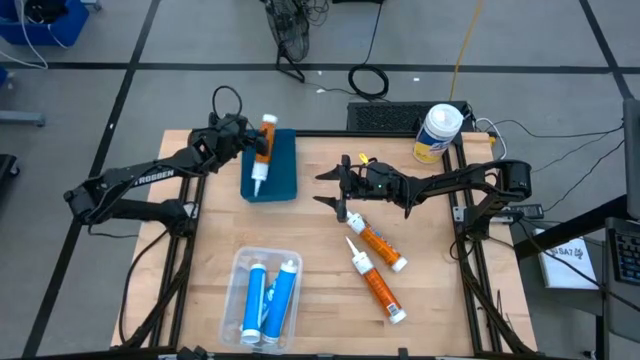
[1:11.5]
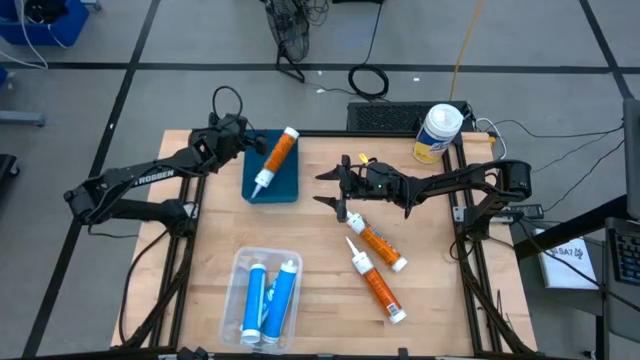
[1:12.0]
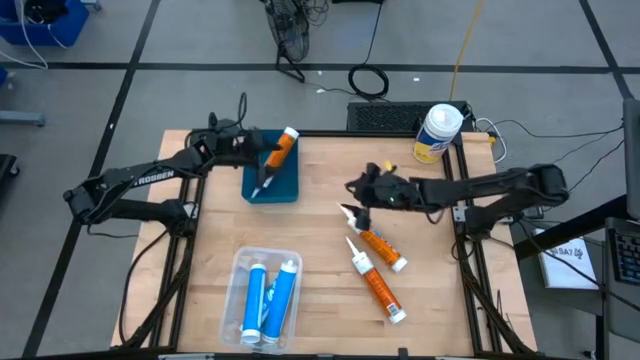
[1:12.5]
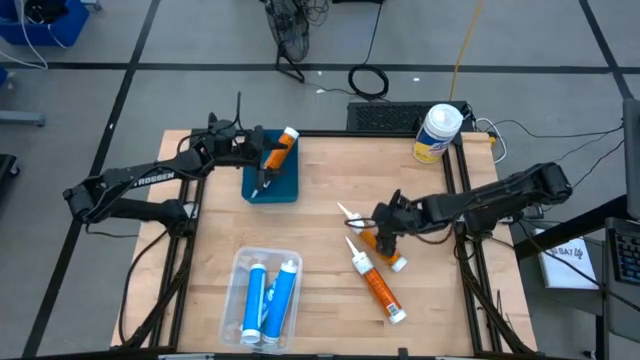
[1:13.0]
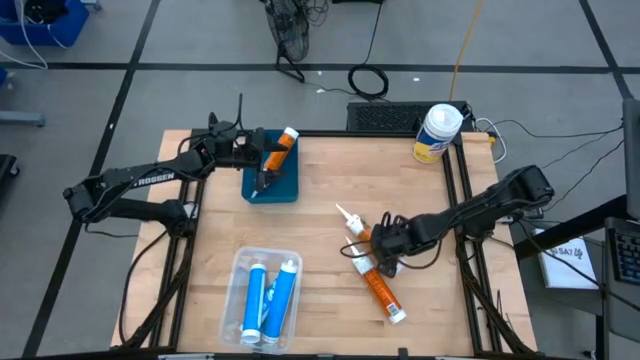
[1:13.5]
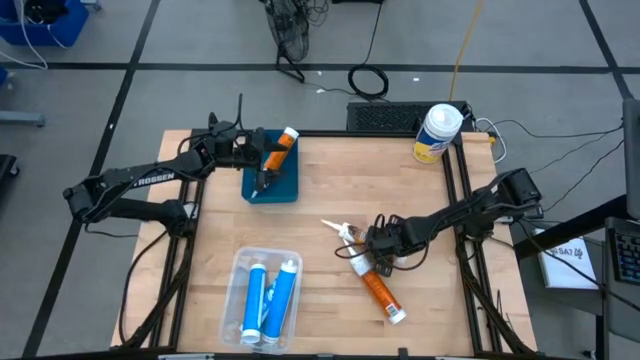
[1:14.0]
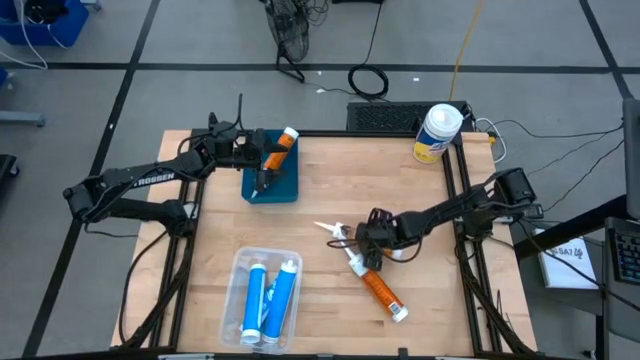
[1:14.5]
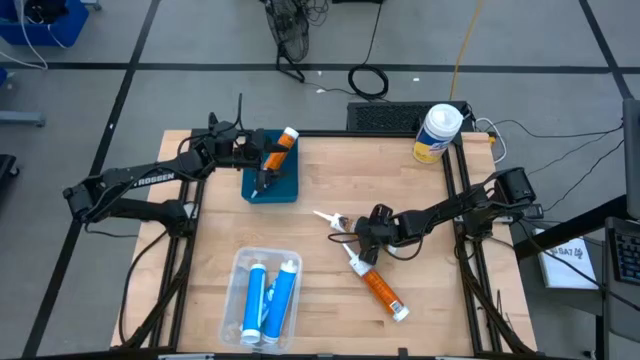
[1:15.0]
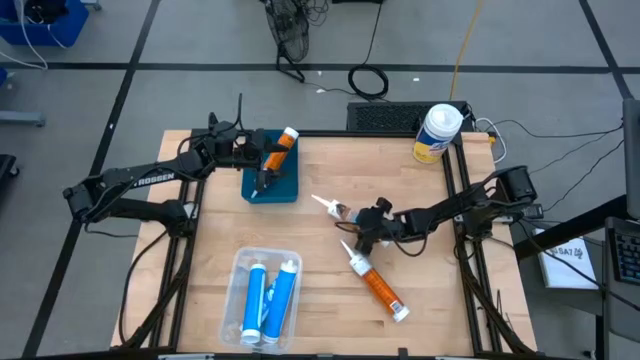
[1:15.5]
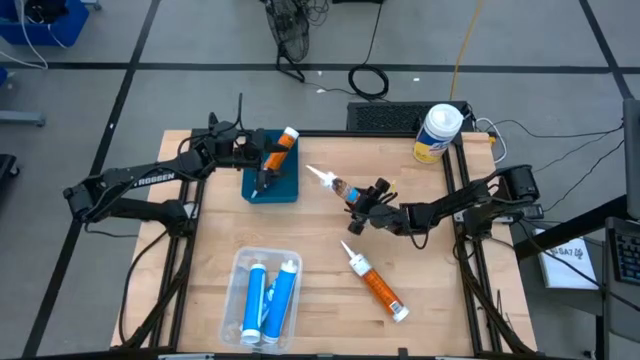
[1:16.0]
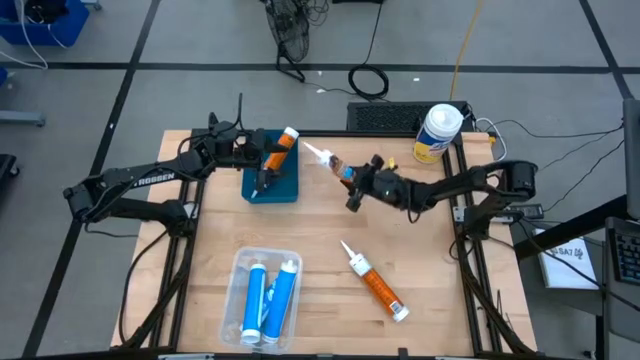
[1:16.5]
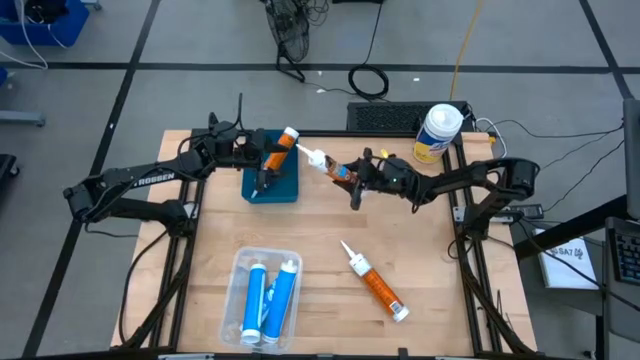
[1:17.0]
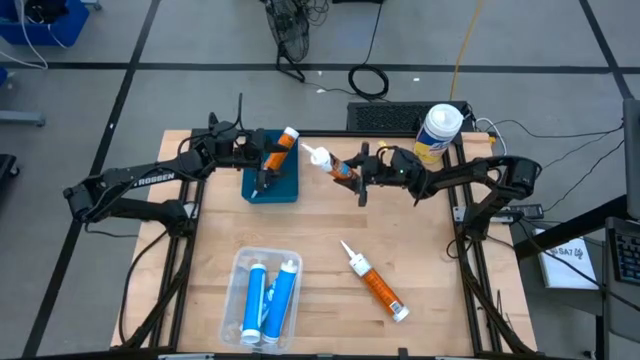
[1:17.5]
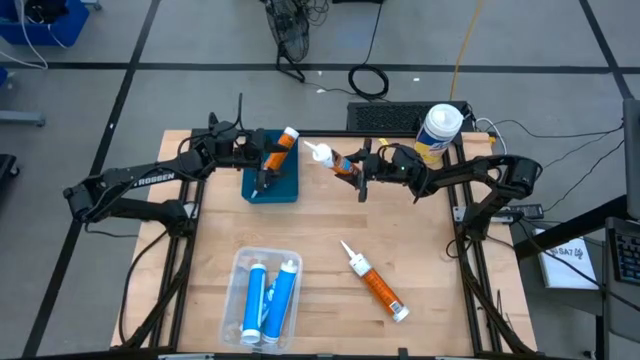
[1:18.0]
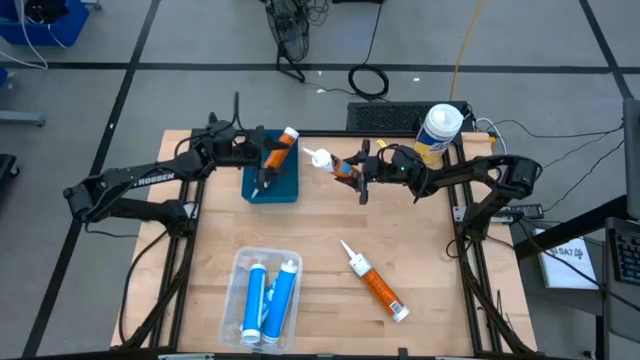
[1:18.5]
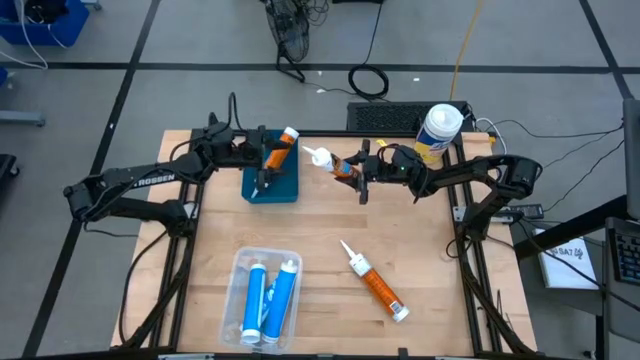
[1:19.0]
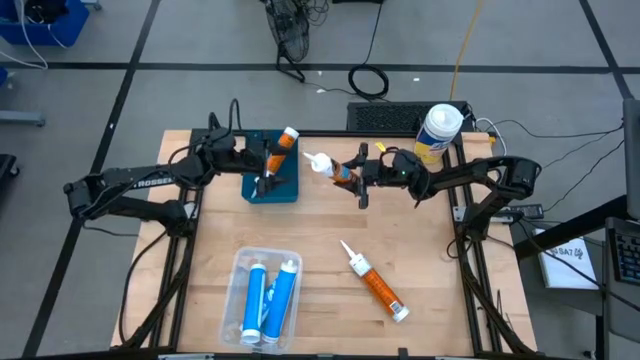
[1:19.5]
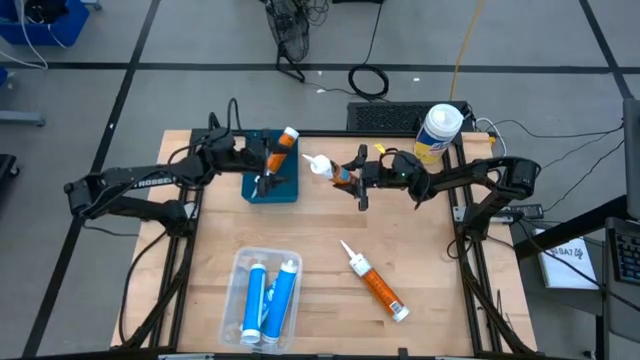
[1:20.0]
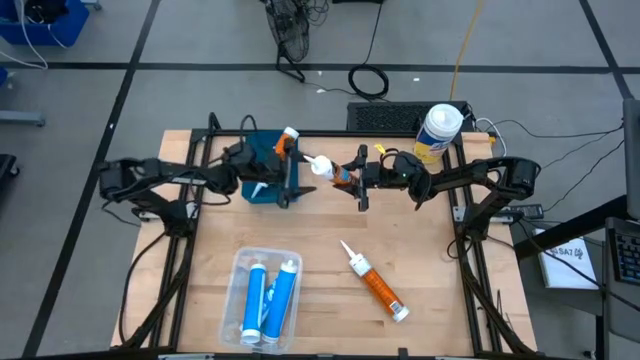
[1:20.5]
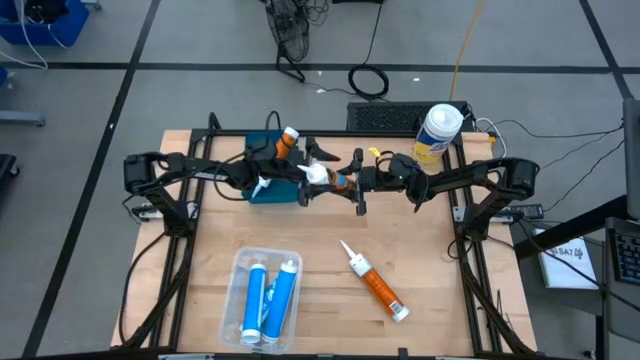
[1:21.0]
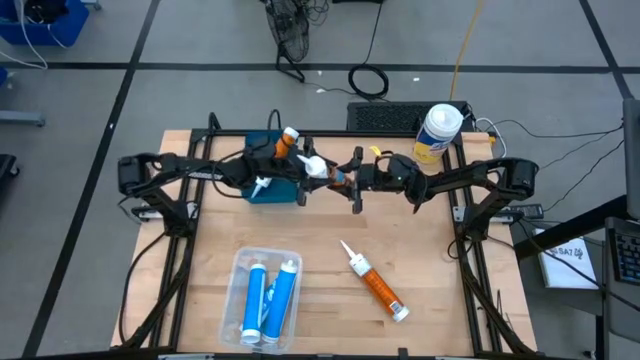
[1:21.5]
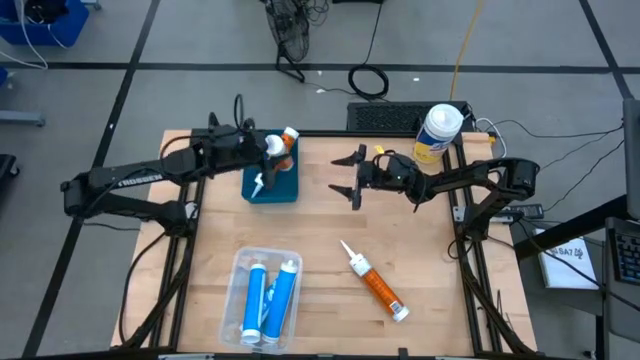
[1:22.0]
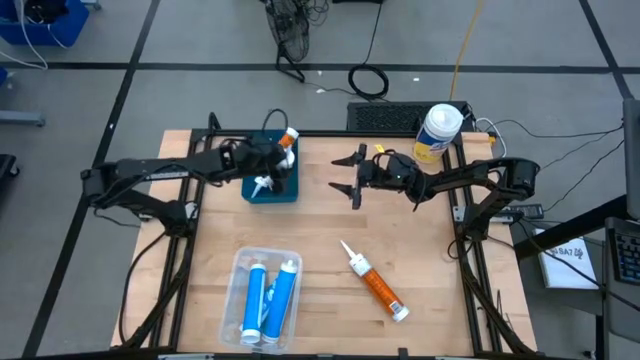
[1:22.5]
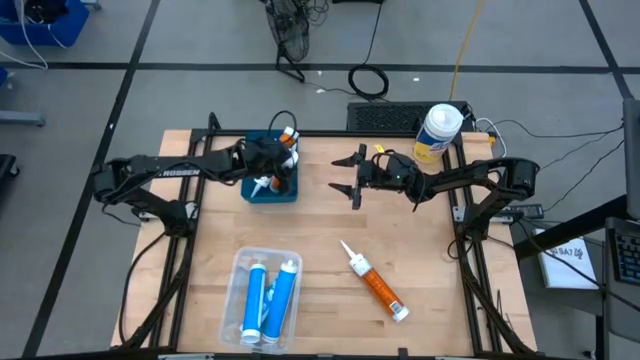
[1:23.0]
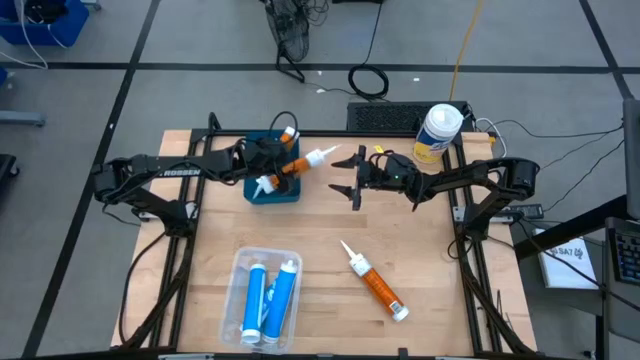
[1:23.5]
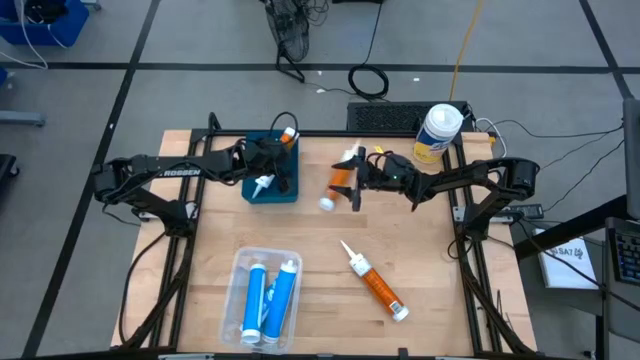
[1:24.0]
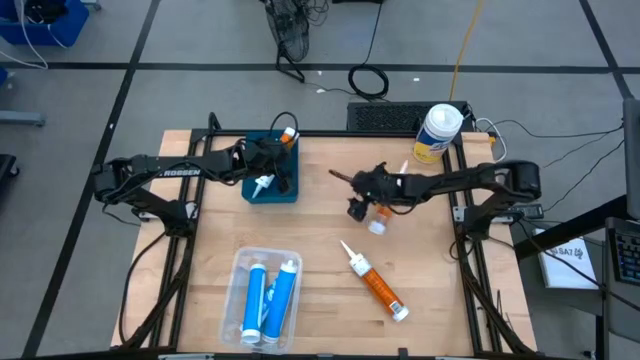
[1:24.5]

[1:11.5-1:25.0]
Task: Pick & place silicon tubes, Sealant and Lysol wipes
Put the right orange sealant into the blue bin

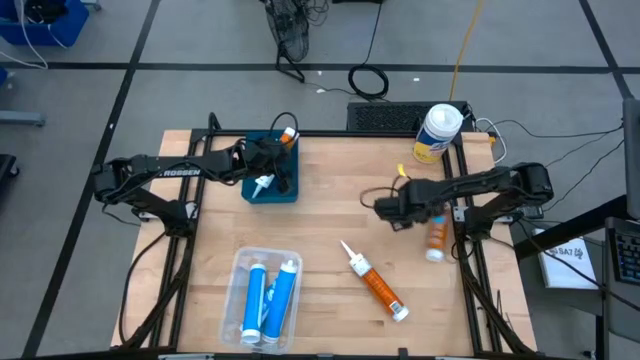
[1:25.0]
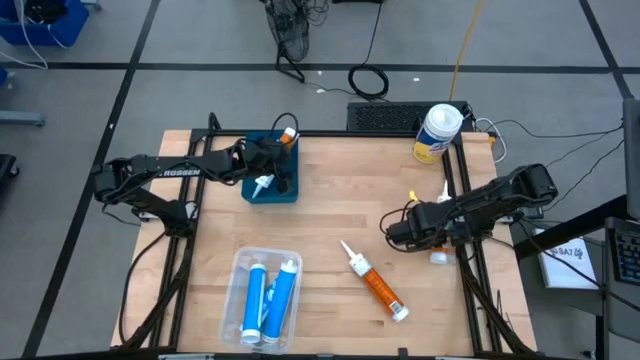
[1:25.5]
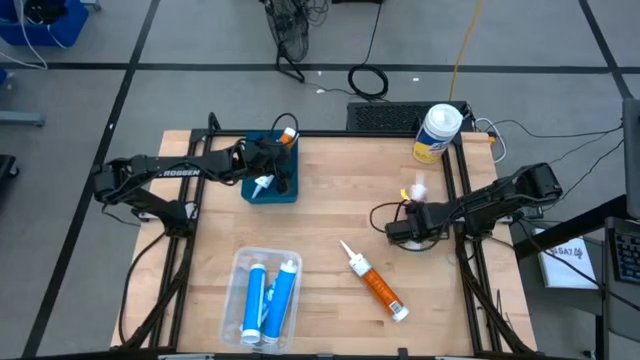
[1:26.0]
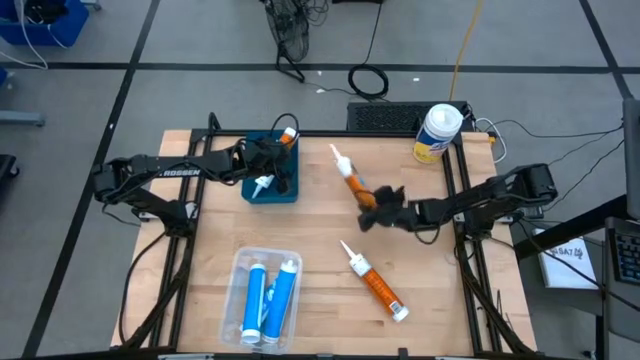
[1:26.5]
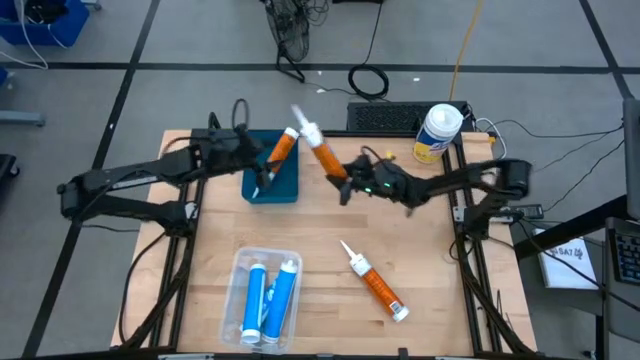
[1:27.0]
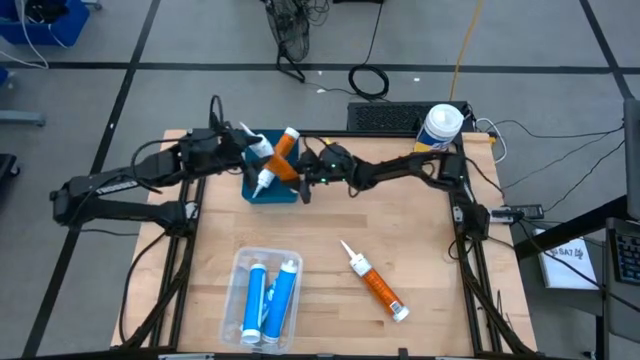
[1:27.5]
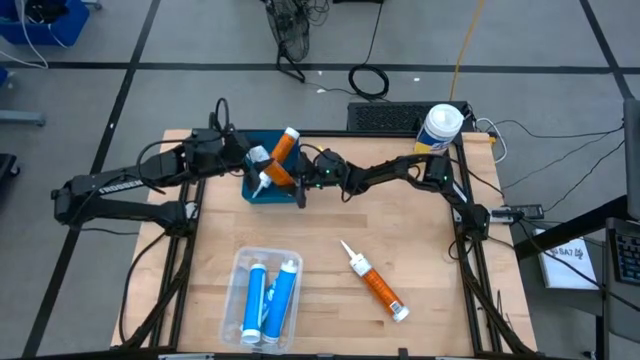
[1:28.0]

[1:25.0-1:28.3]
Put the right orange sealant into the blue bin

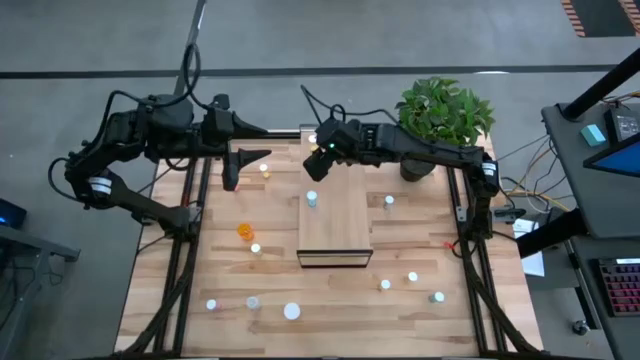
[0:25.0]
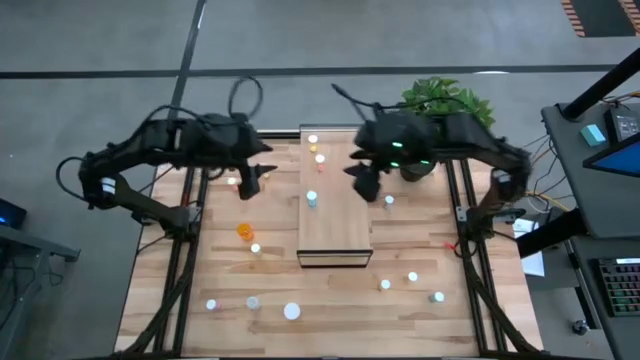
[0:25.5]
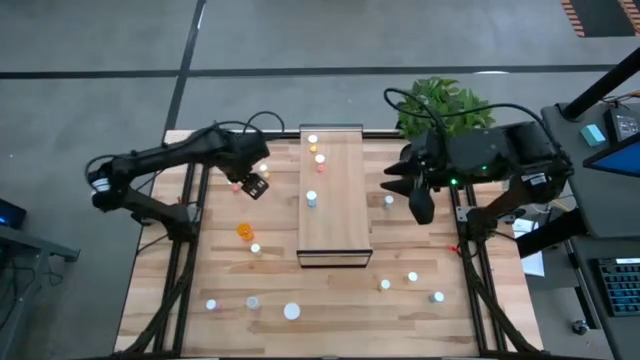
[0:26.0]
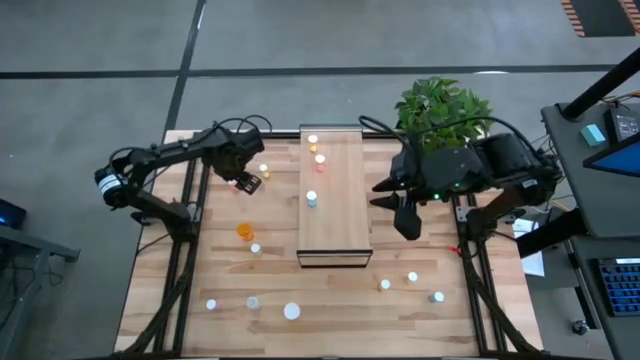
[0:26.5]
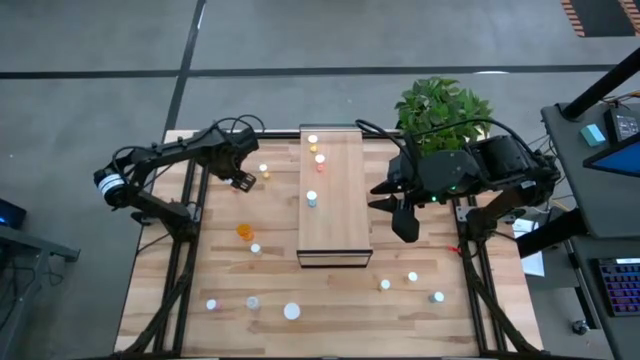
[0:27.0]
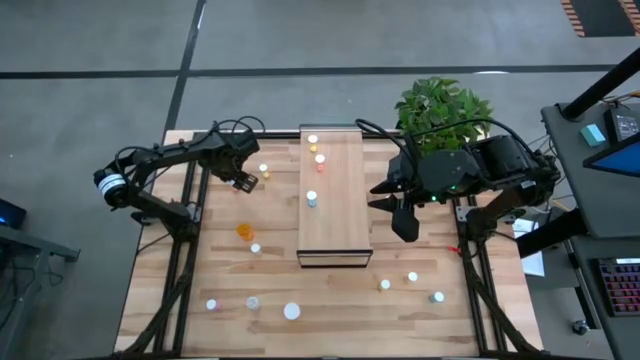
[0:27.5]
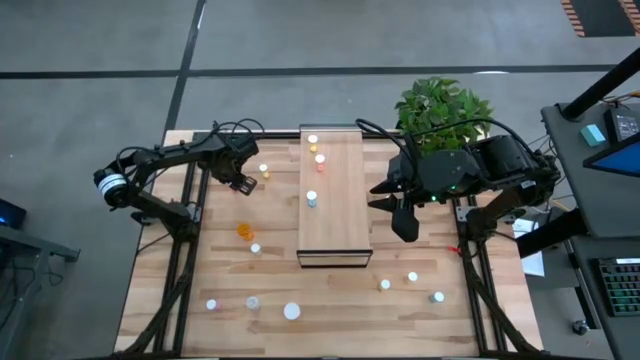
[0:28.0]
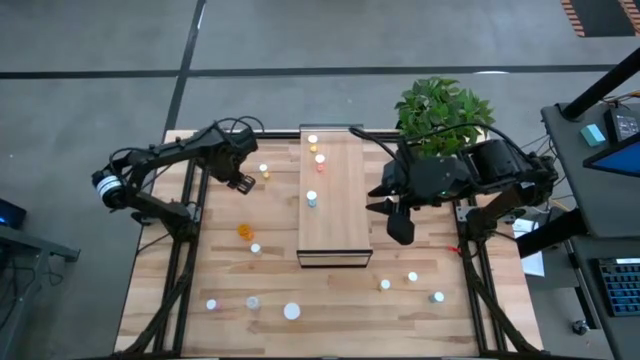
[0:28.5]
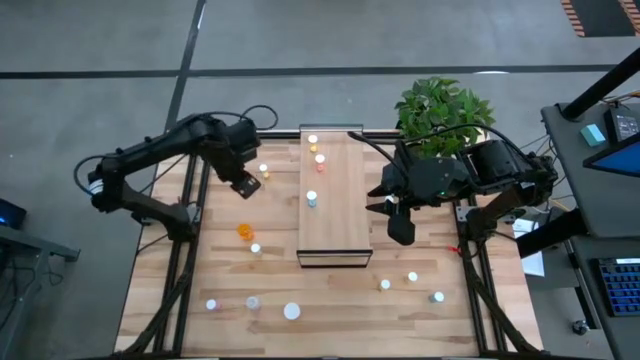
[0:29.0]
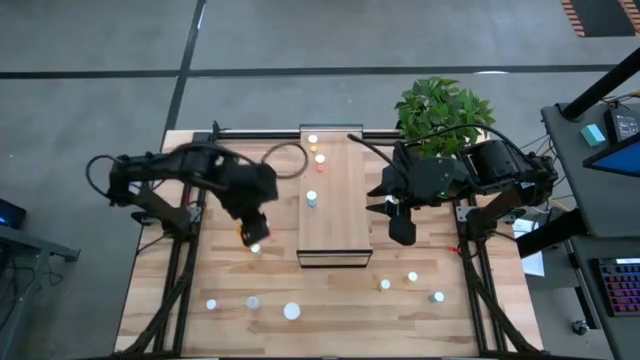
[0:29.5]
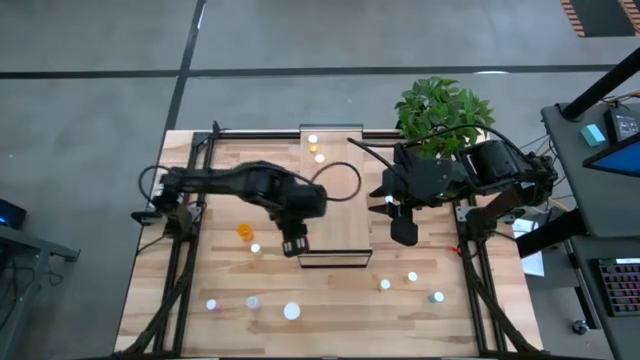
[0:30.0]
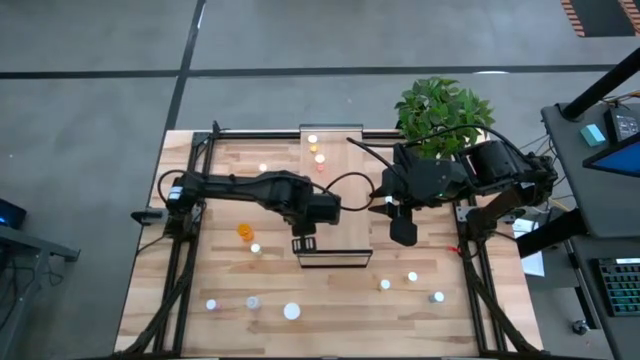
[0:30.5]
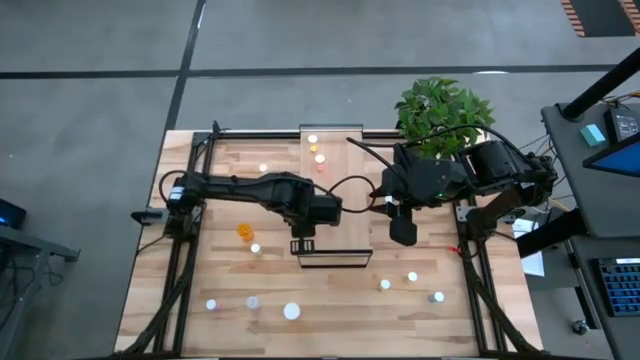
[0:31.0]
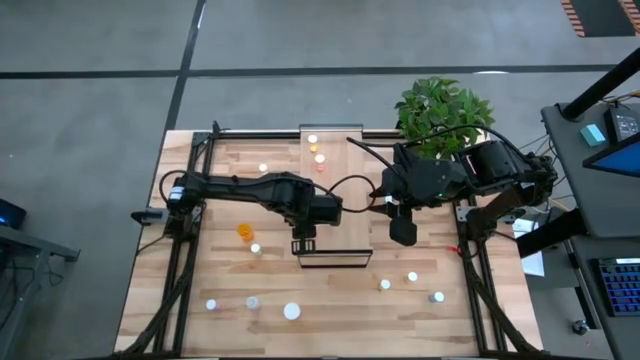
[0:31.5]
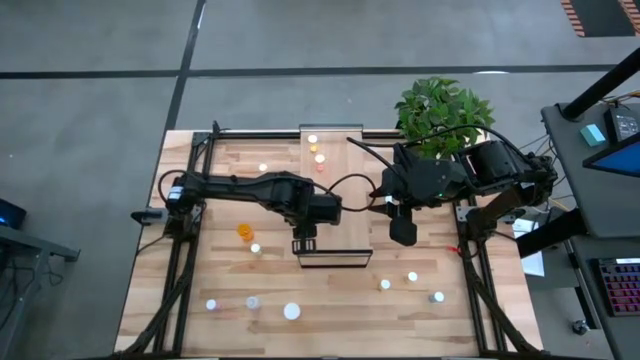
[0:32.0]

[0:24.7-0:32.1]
Task: Pick and place medicine bottles onto shelf by color
Put the red bottle on the shelf
